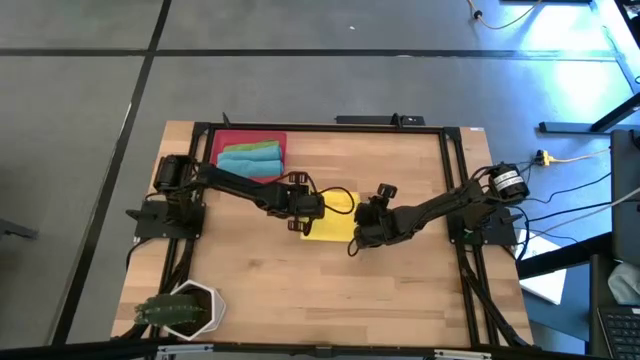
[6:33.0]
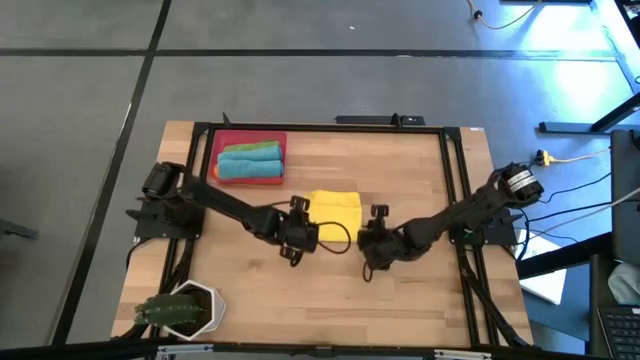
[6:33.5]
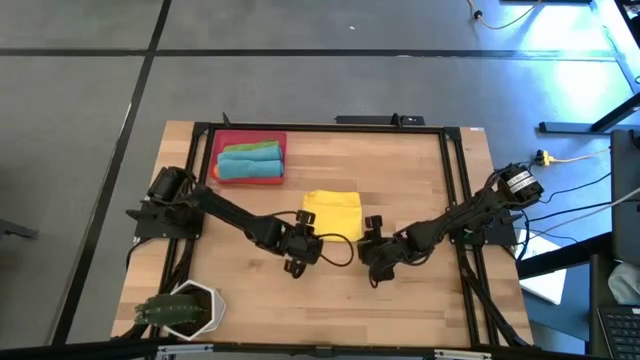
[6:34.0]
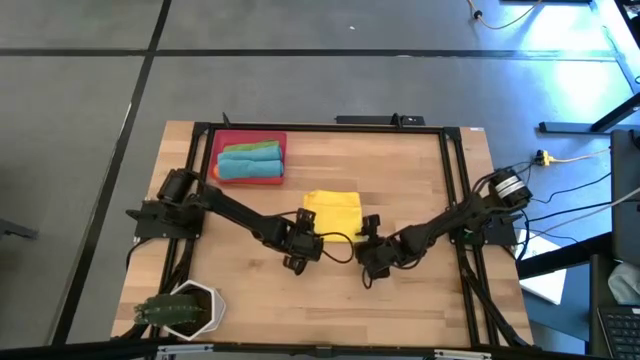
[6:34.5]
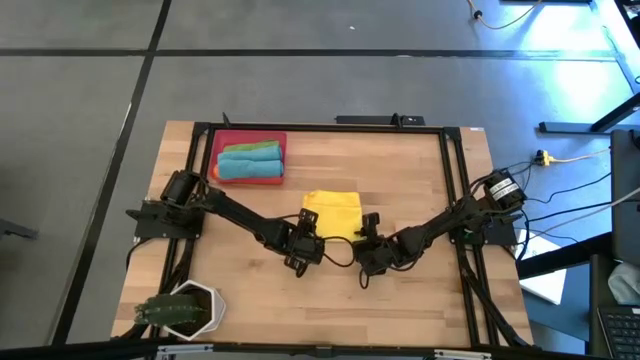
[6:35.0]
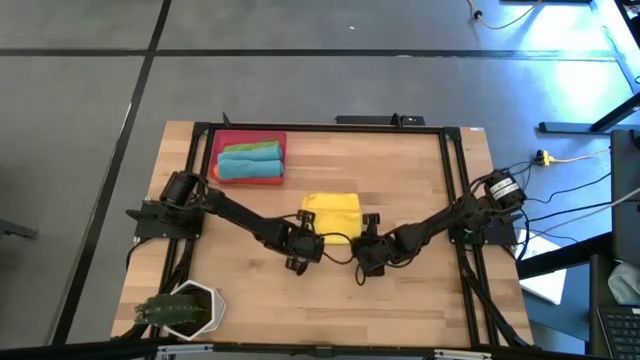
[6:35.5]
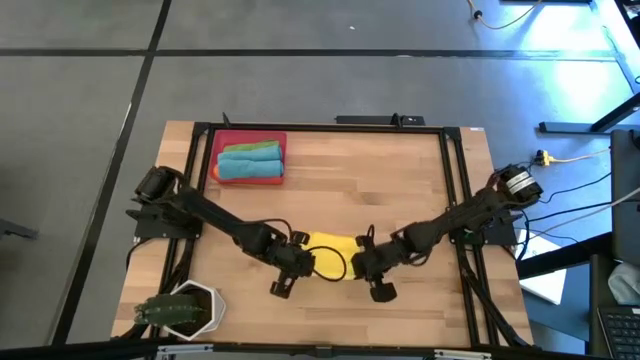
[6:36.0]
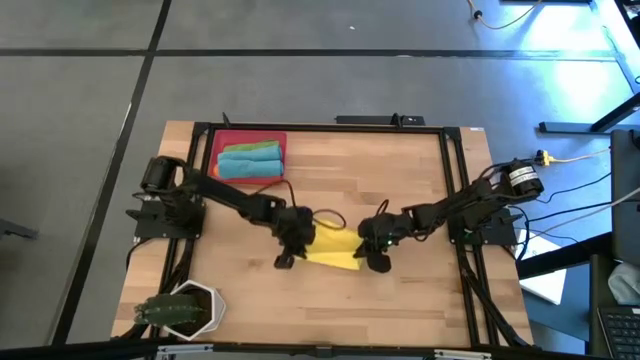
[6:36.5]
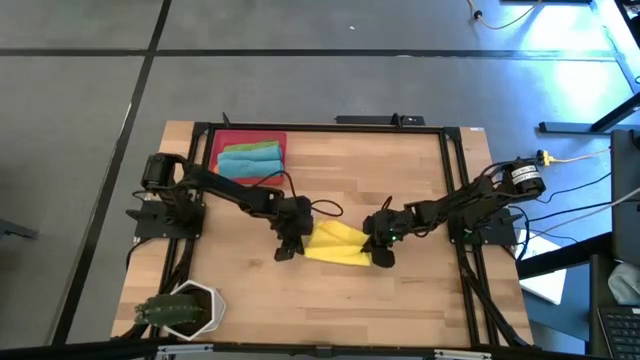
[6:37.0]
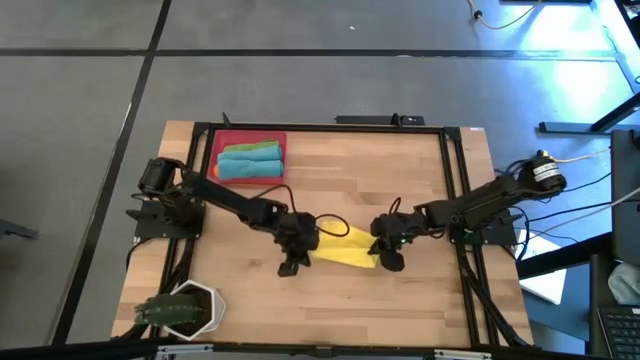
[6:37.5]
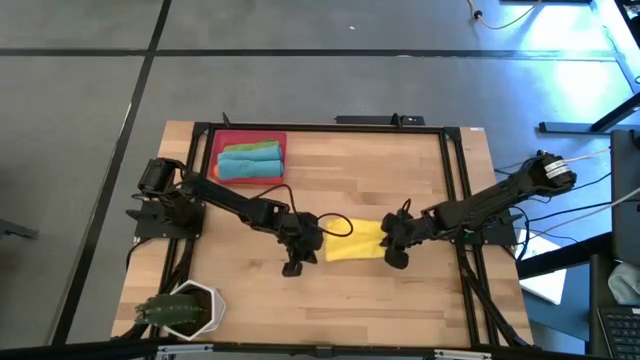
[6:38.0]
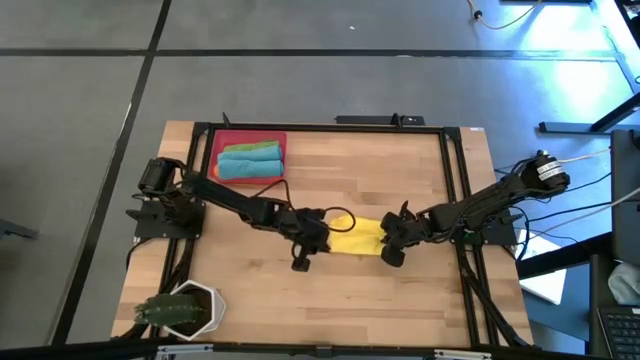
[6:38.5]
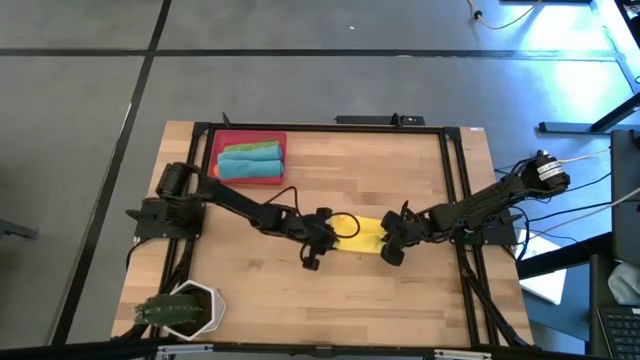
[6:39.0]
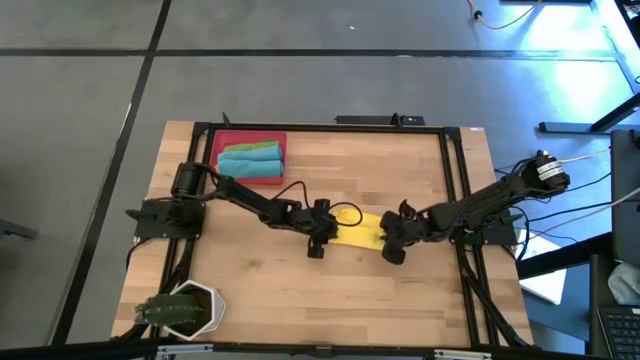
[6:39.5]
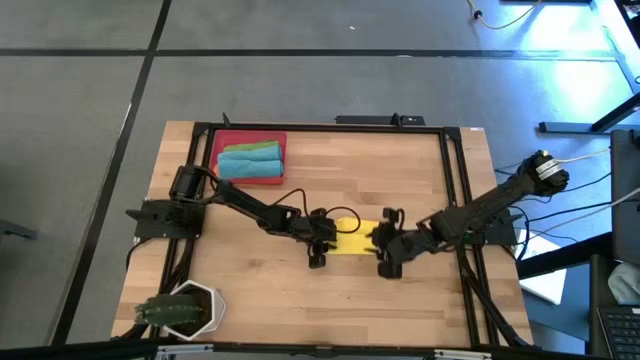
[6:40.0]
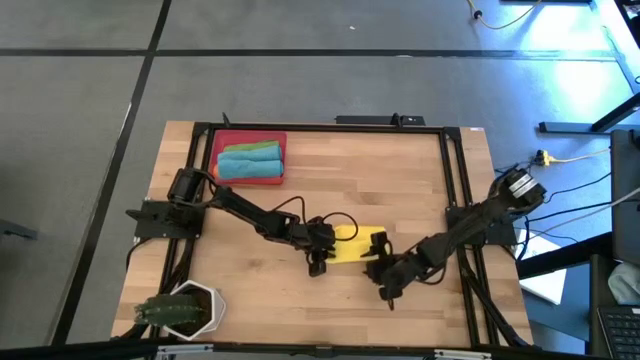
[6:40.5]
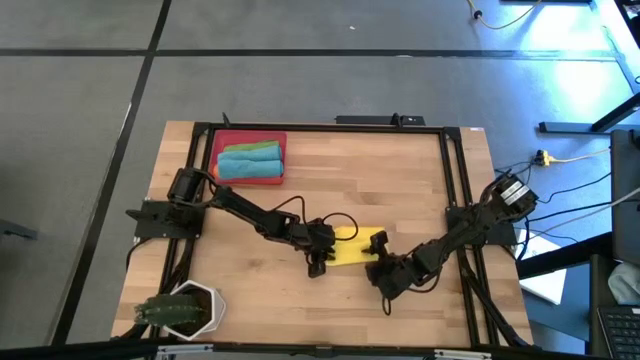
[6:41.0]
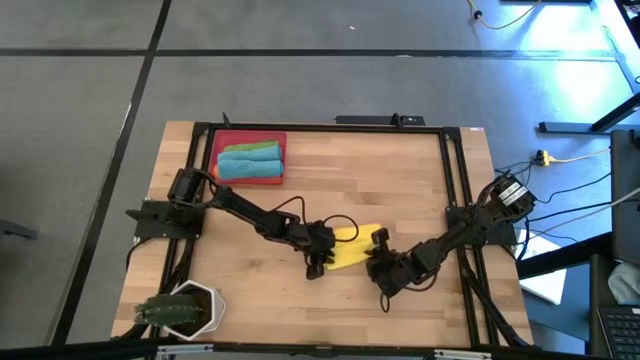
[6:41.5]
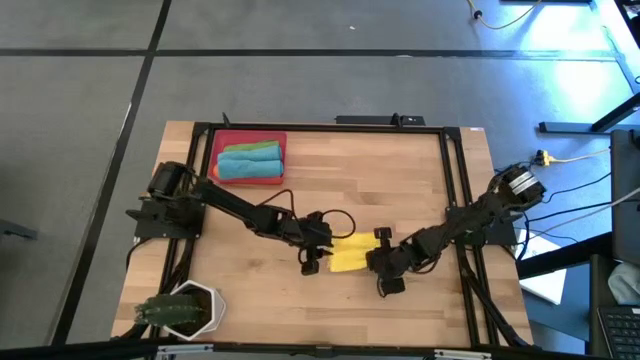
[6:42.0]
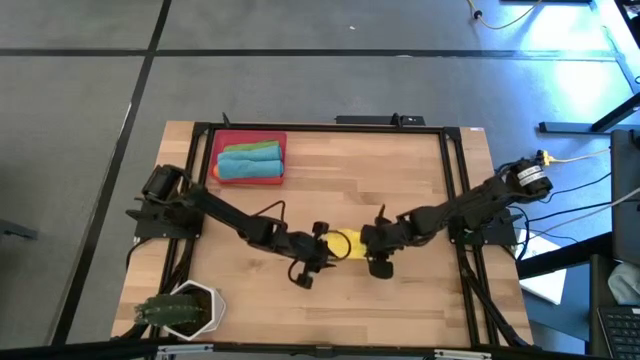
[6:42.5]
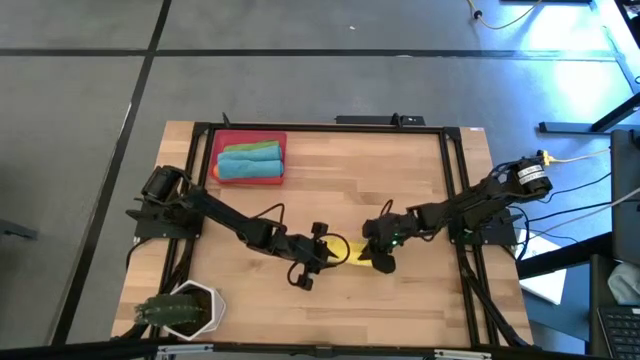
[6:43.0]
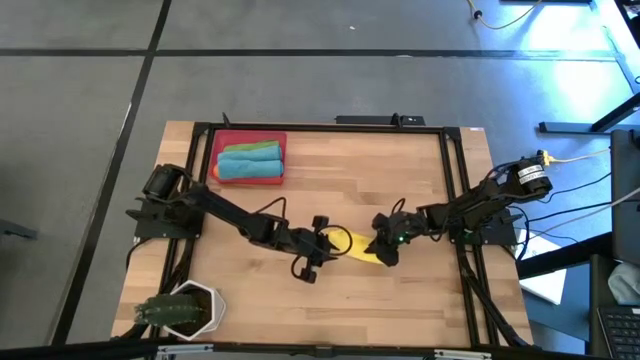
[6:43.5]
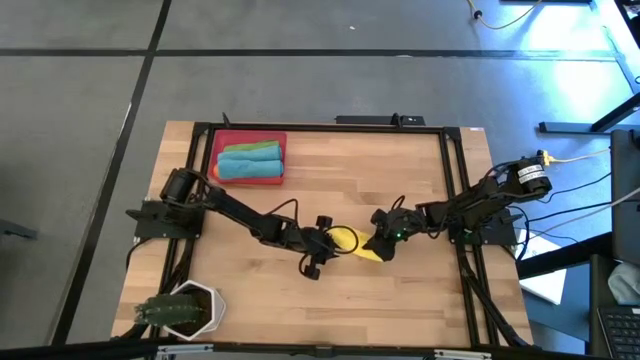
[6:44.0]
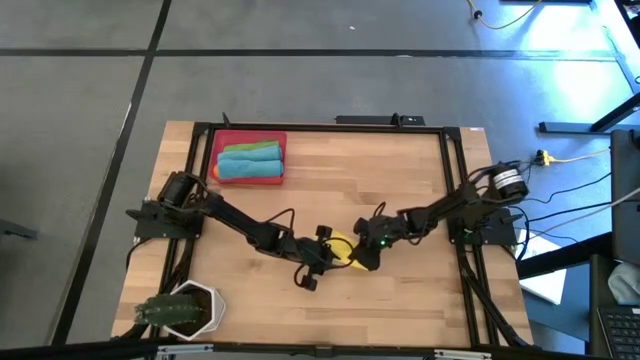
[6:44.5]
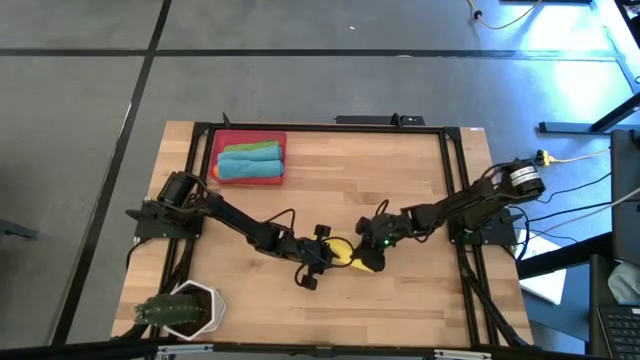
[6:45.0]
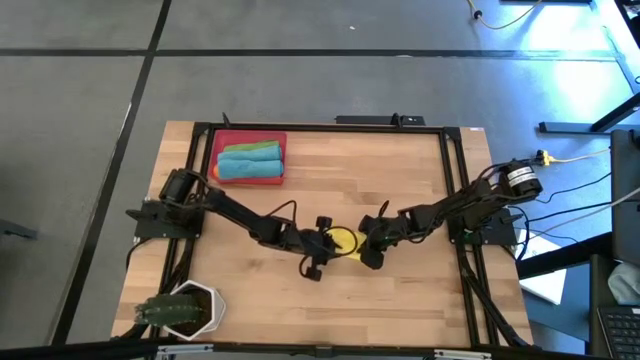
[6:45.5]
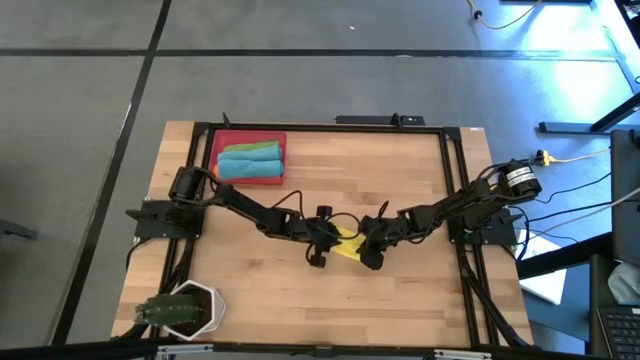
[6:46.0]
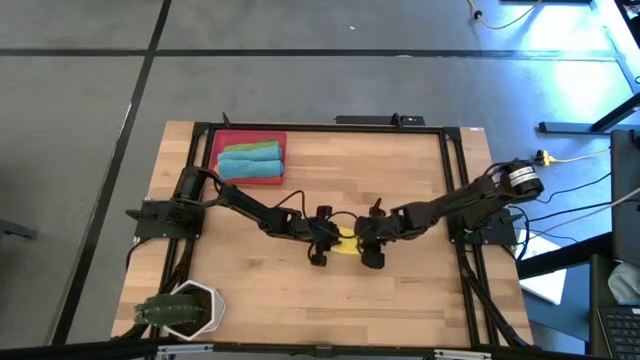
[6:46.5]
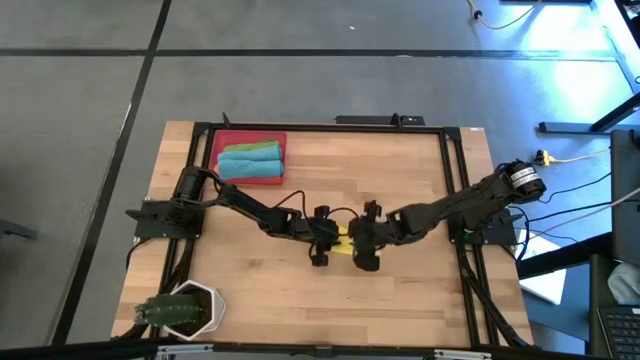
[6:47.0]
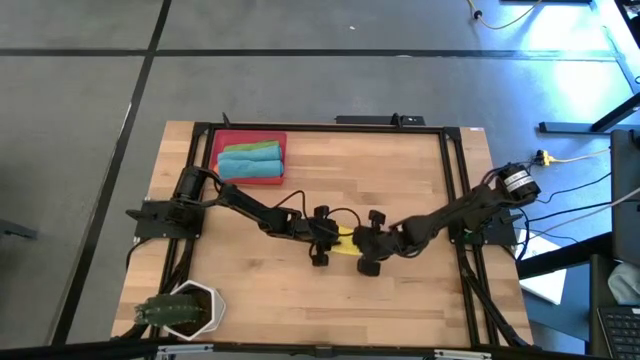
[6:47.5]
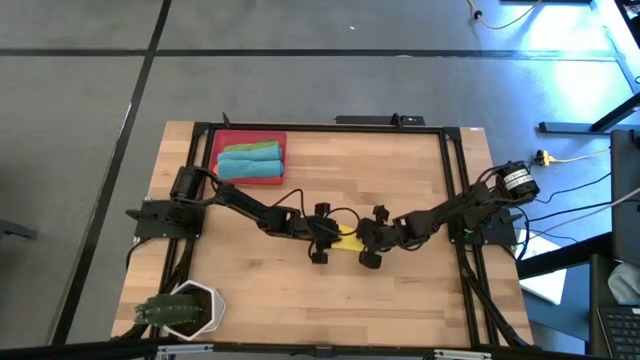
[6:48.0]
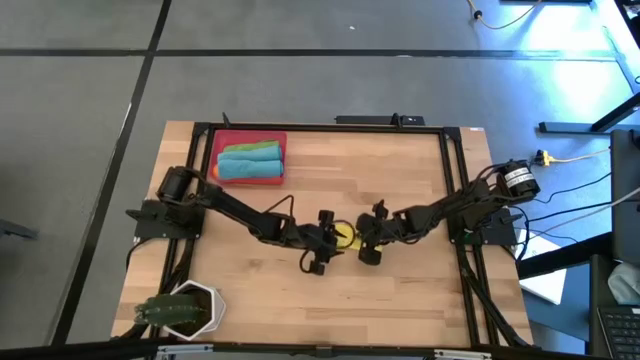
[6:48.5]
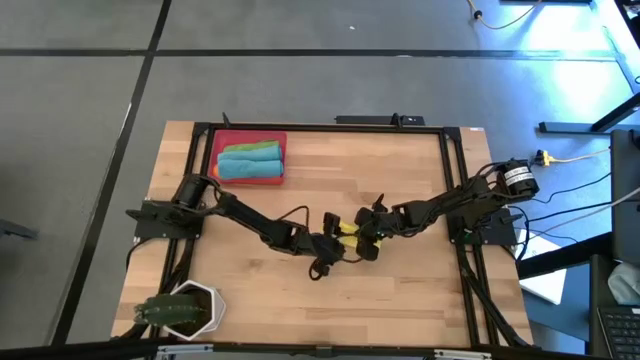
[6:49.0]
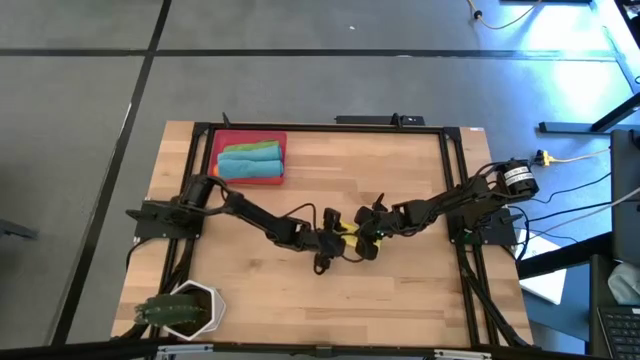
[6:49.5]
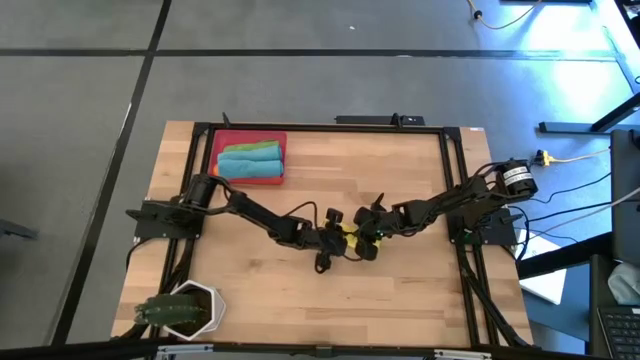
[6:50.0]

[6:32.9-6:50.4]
Task: Roll microfiber towels into tight, uniform cylinder then place into a basket
Roll the yellow microfiber towel

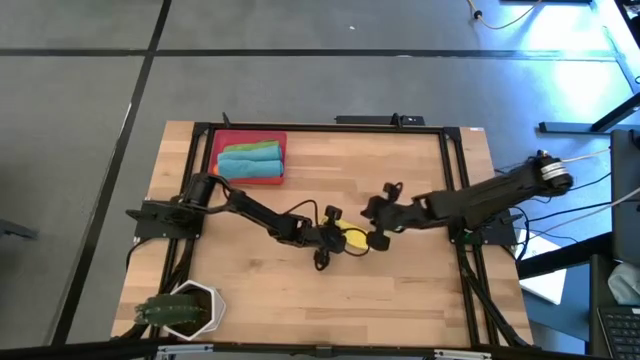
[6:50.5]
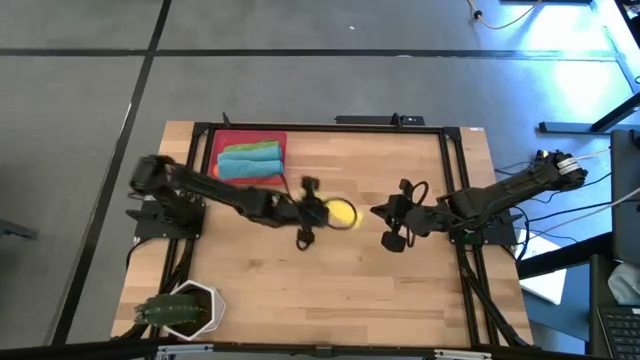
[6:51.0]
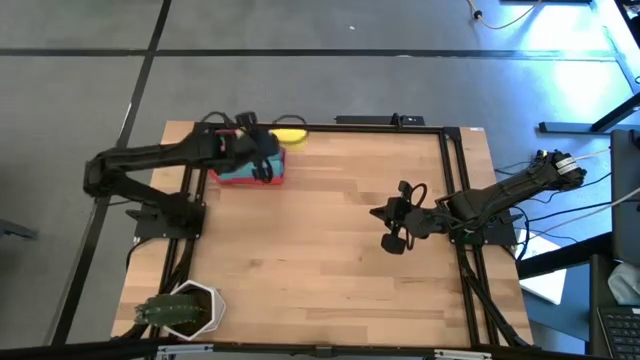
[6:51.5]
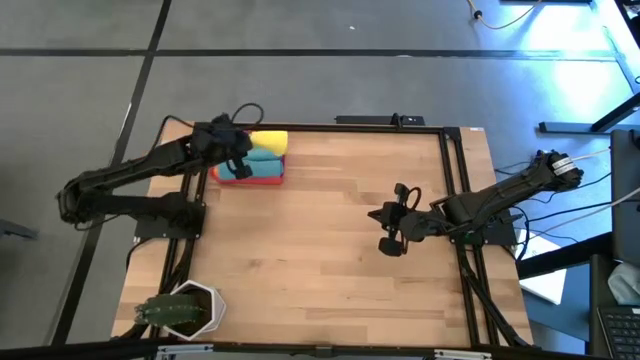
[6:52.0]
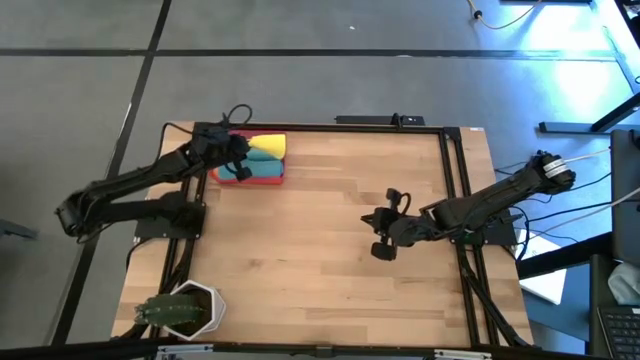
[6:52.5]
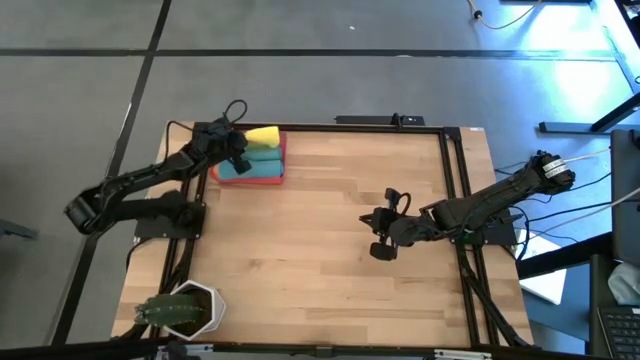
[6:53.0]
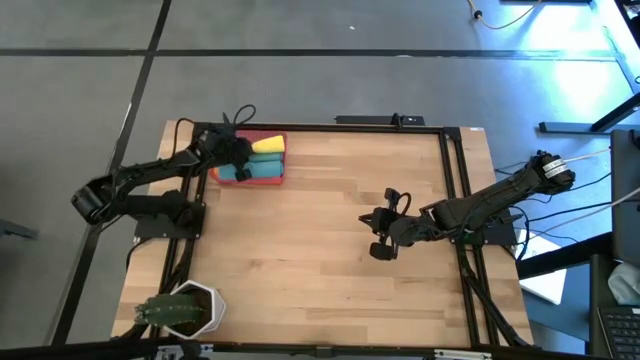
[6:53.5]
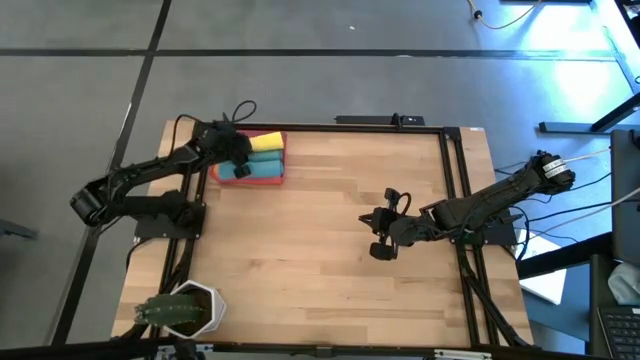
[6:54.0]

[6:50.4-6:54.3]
Put the rolled yellow microfiber towel into the red bin

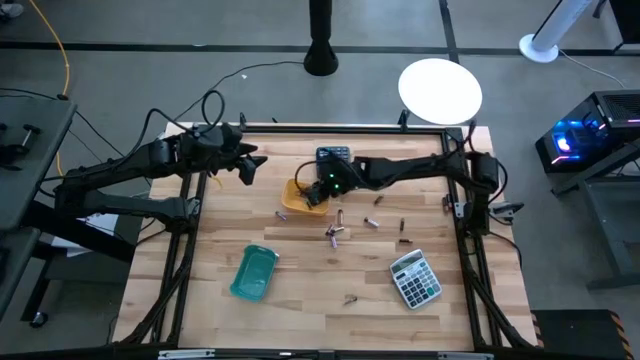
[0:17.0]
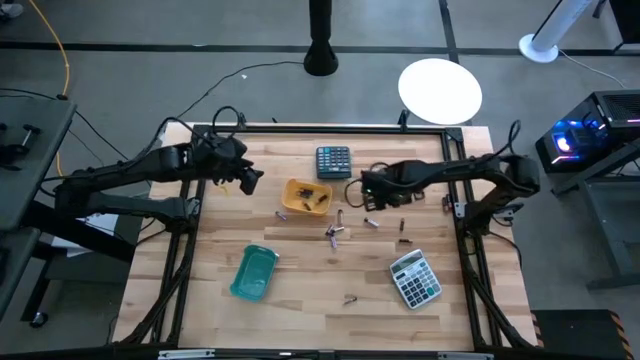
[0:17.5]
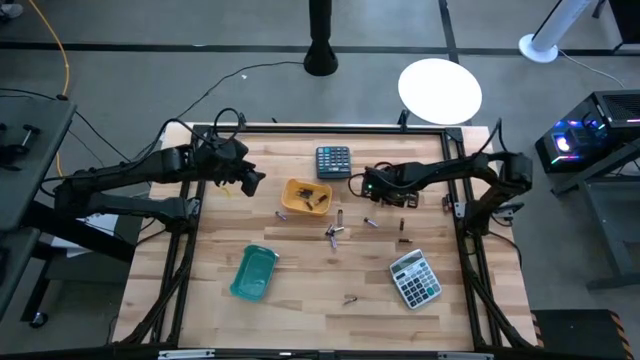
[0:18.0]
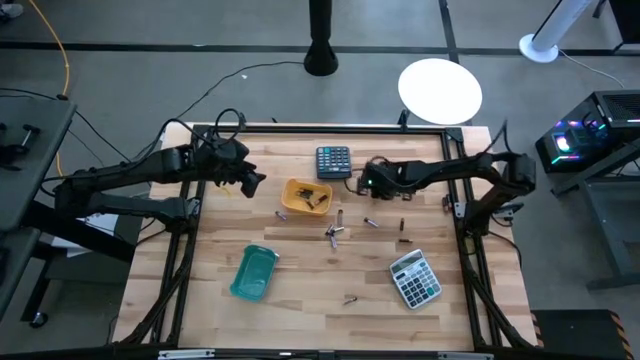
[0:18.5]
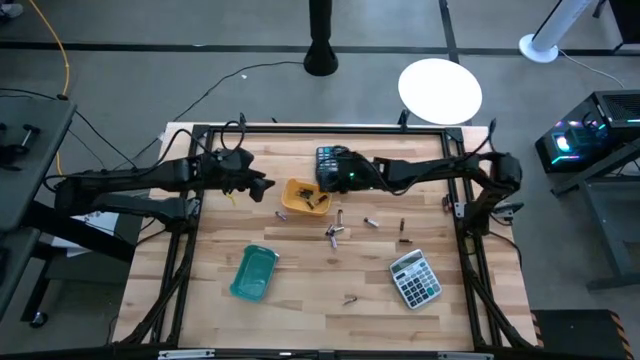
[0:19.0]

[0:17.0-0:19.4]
Task: Sort batteries
Put the black battery into the yellow bin
